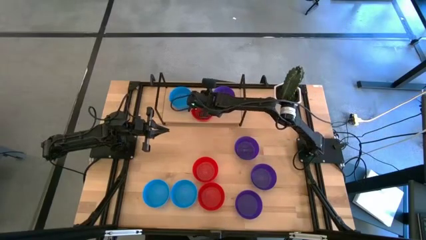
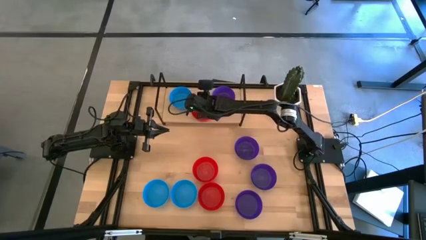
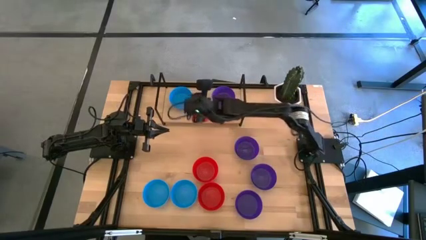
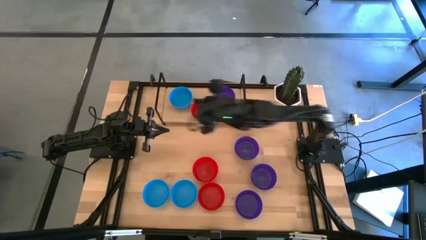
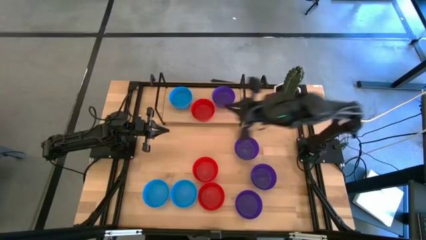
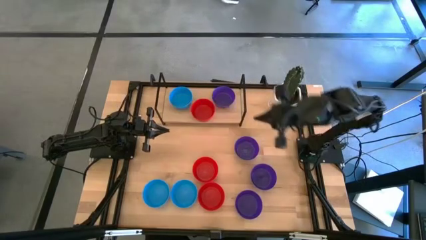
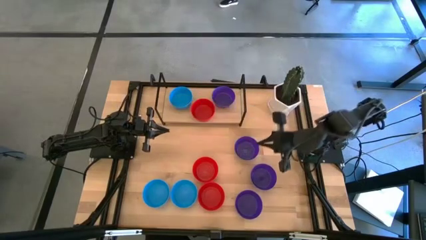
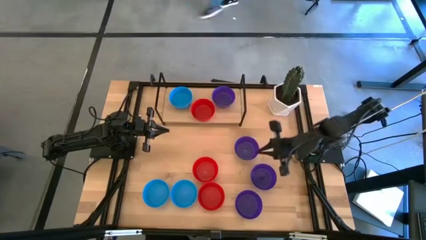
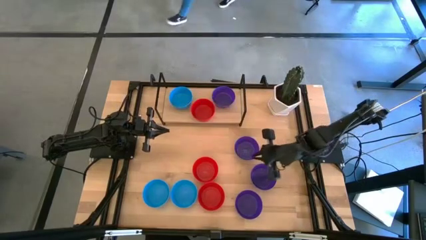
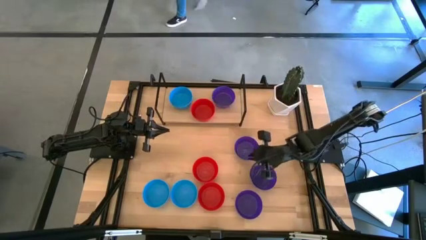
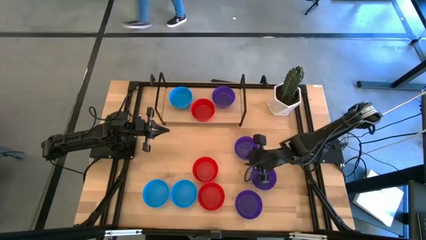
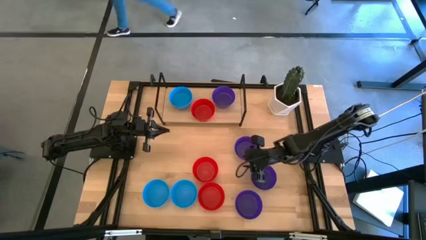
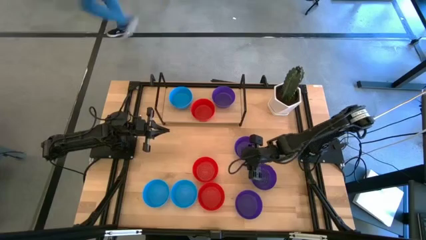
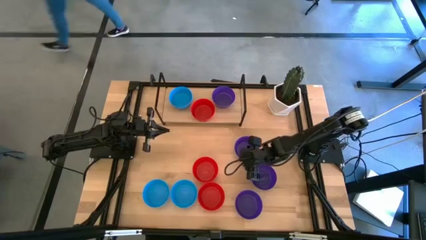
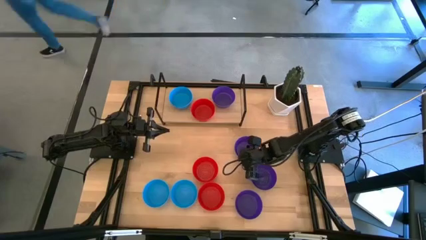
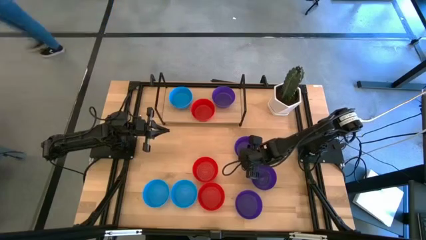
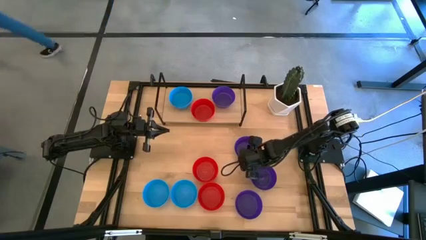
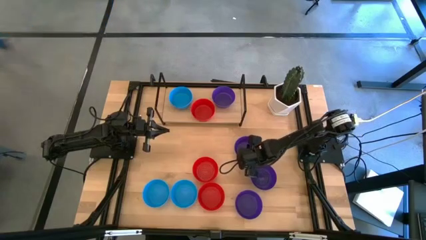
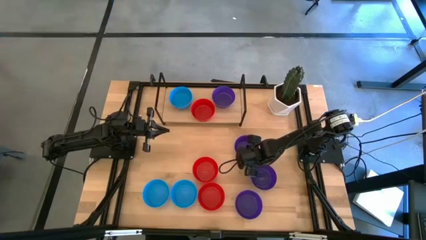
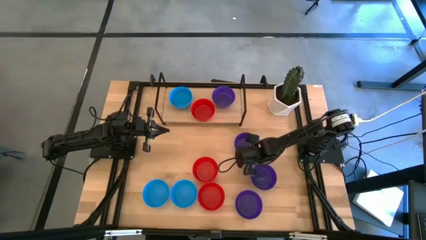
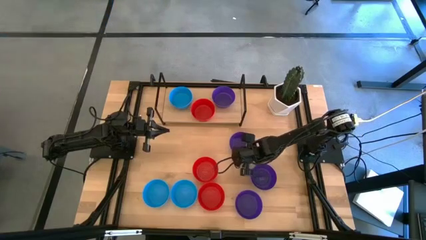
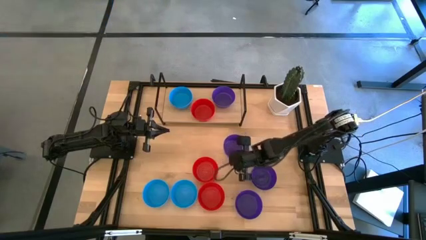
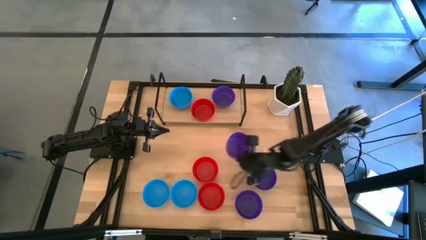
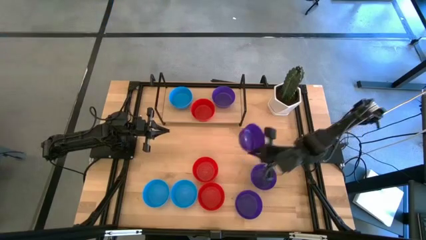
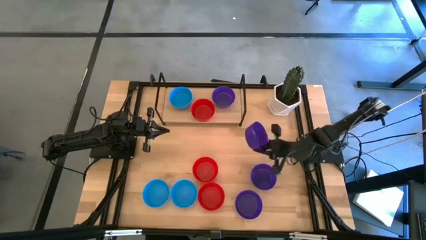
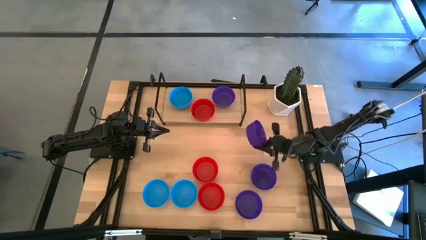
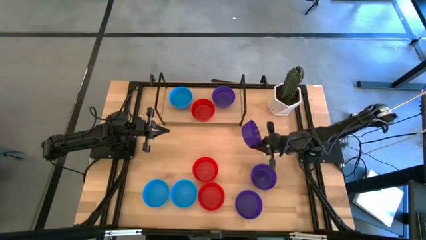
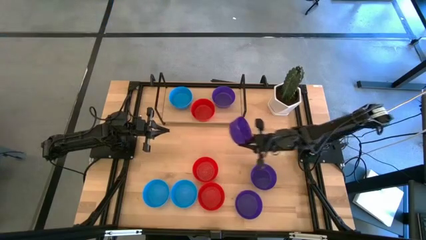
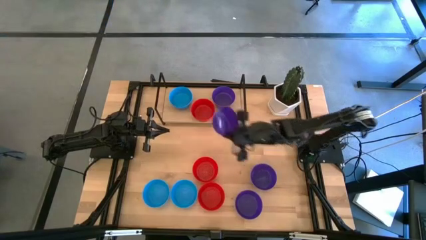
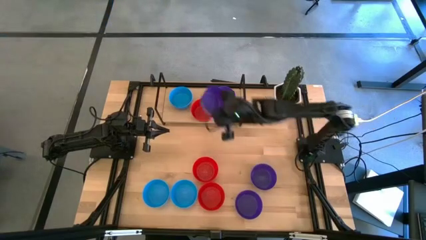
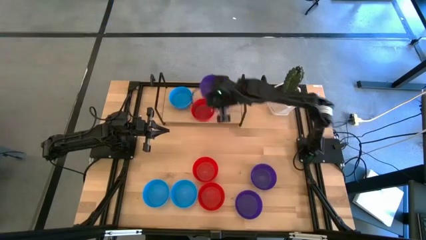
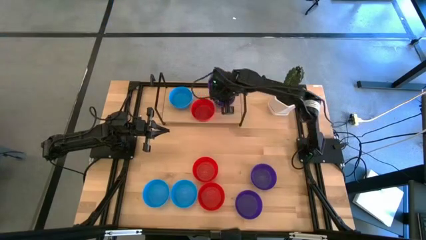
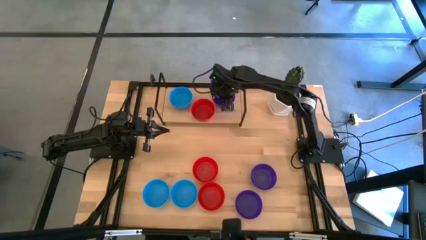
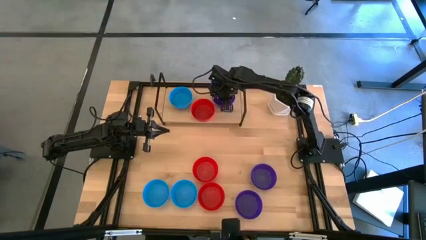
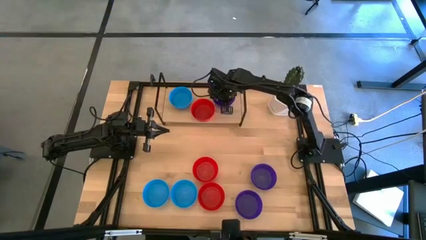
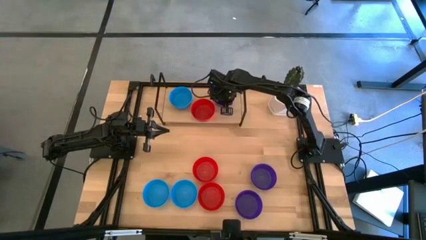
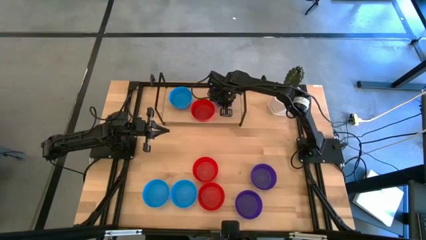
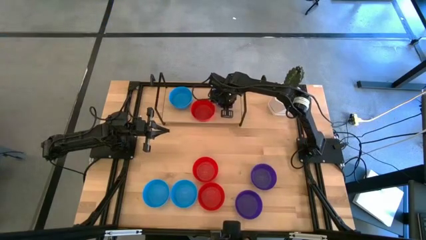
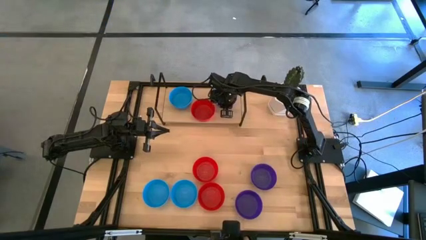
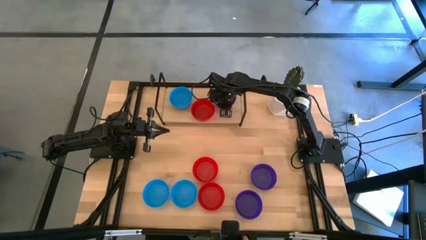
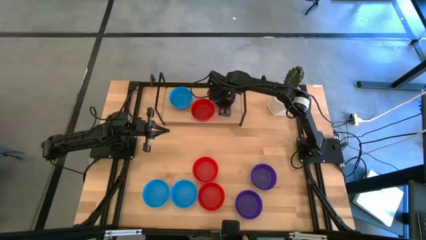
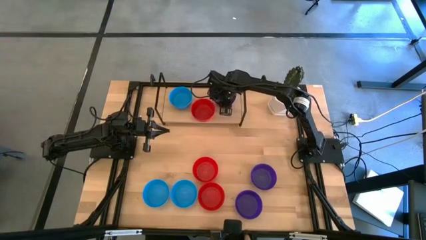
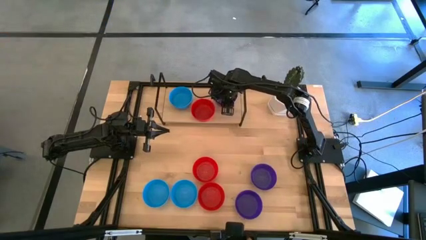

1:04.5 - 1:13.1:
Task: Pick & Place Mini bowls
Stack the violet bowl on top of the violet bowl on the shelf

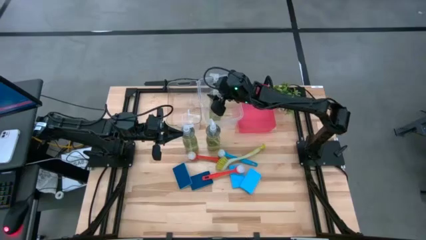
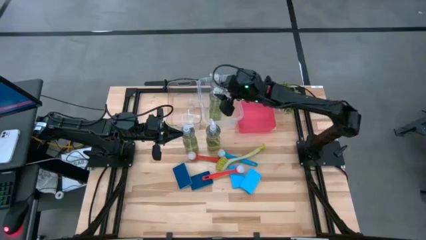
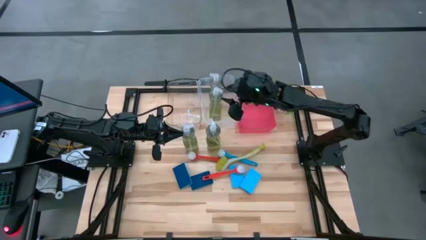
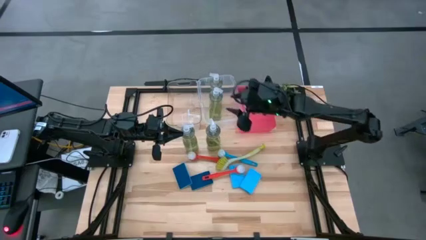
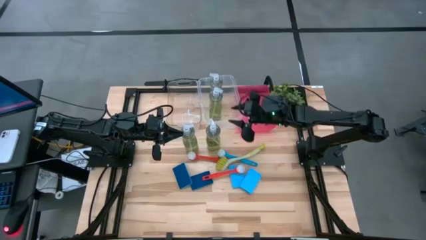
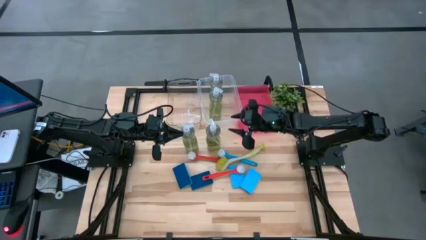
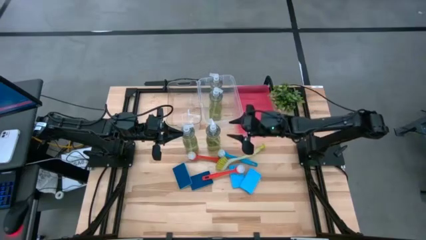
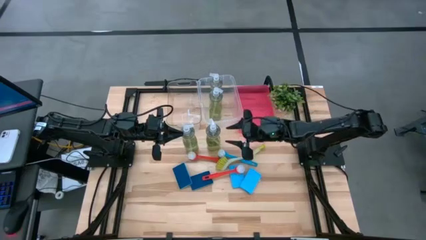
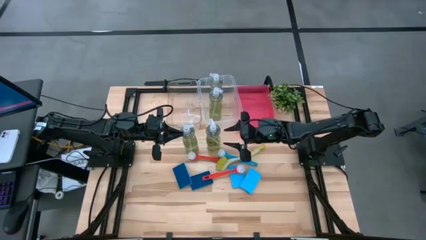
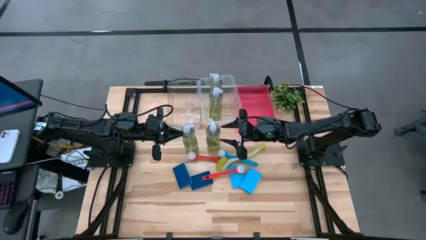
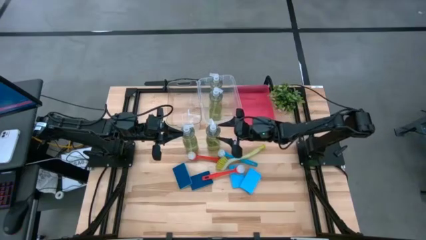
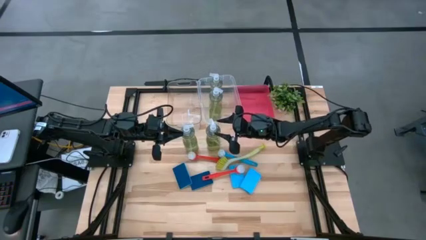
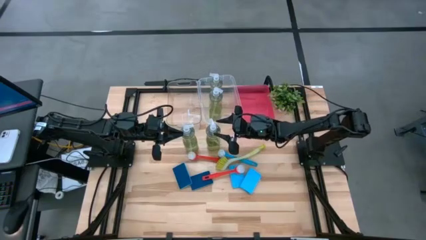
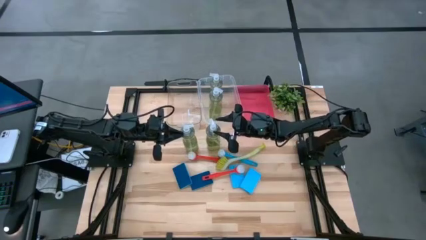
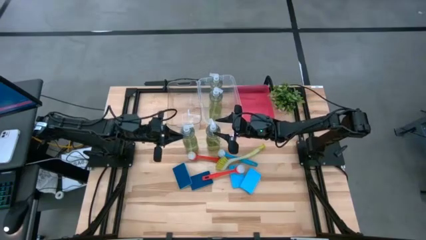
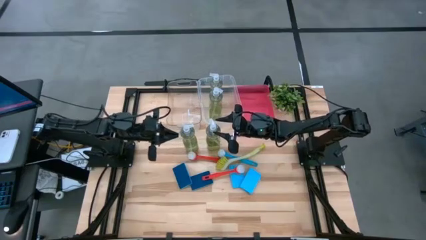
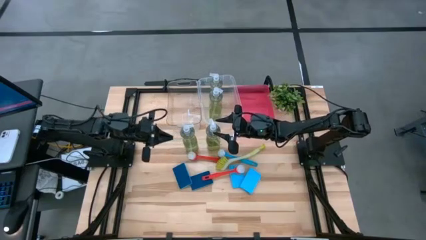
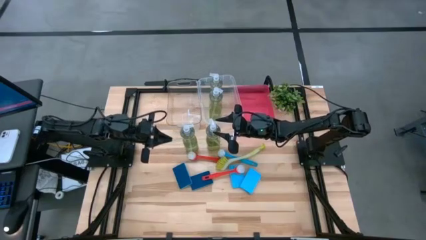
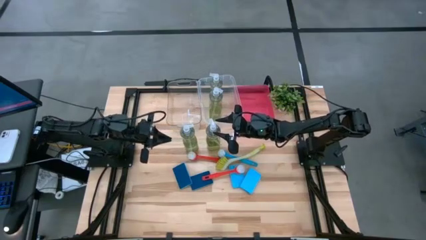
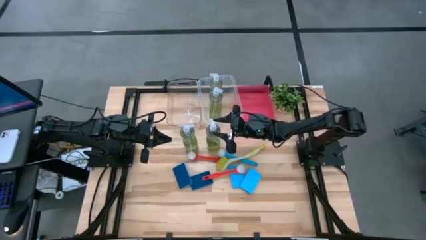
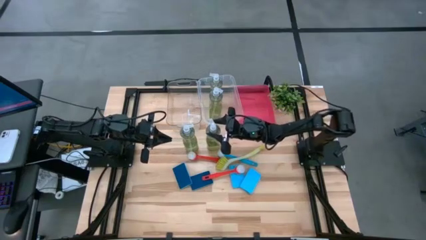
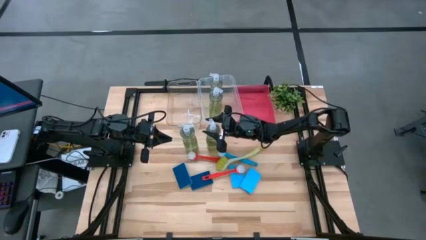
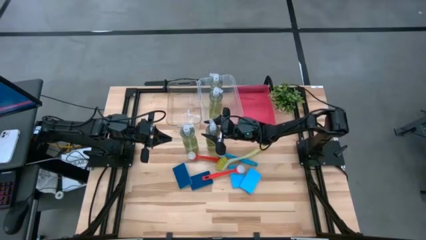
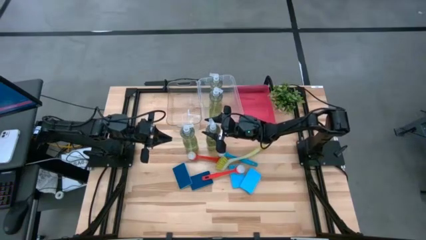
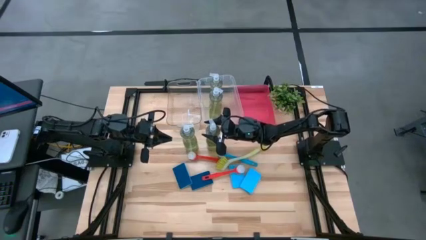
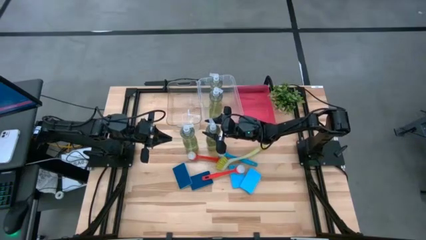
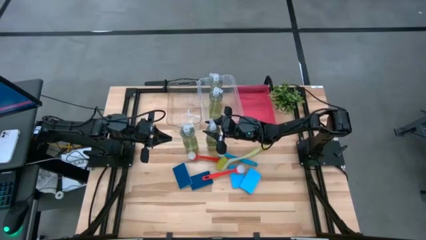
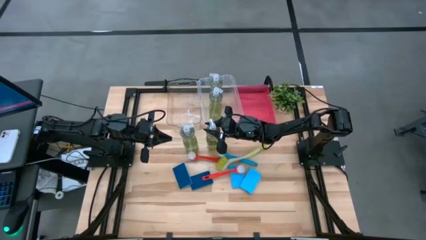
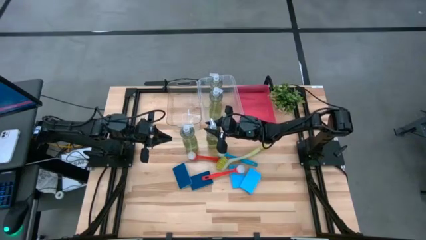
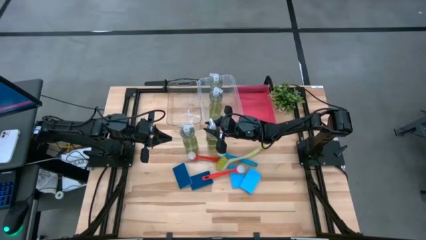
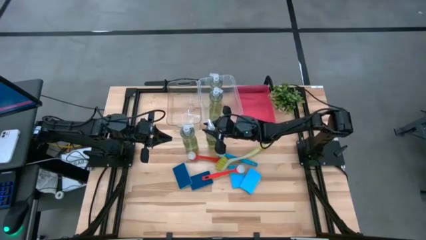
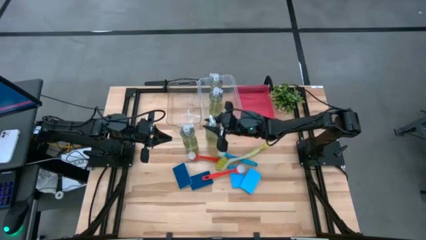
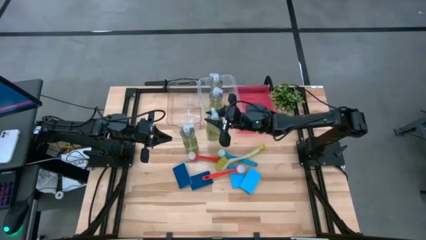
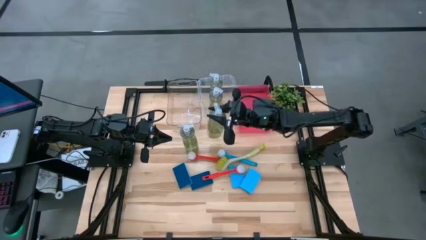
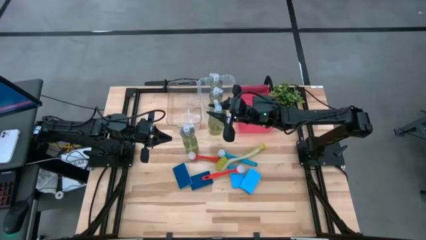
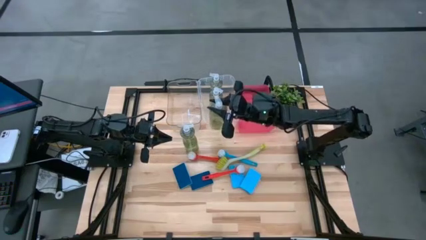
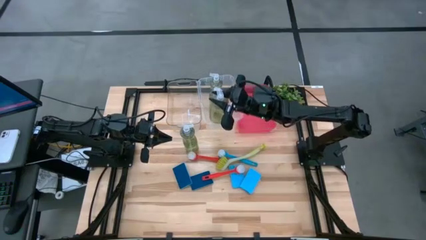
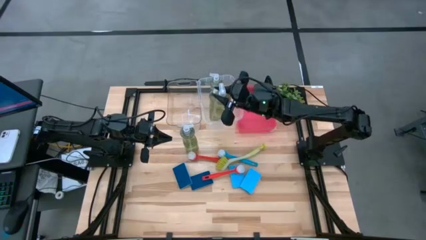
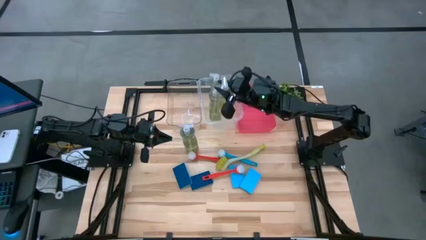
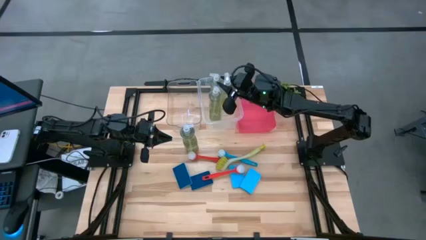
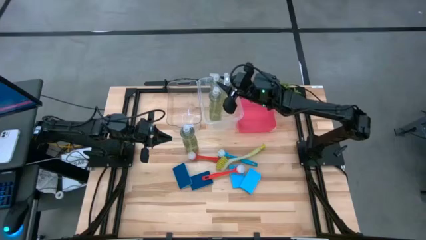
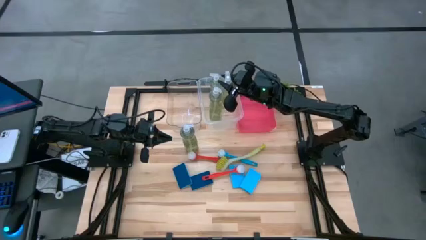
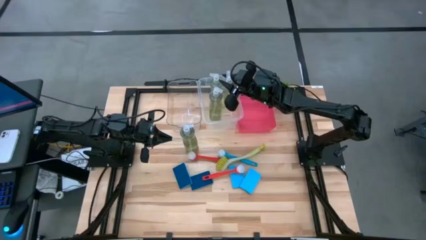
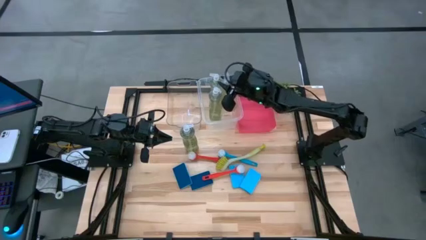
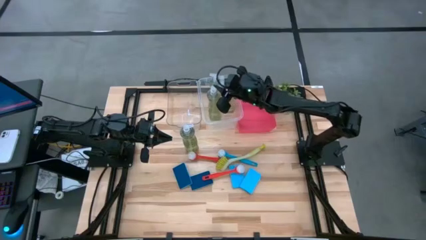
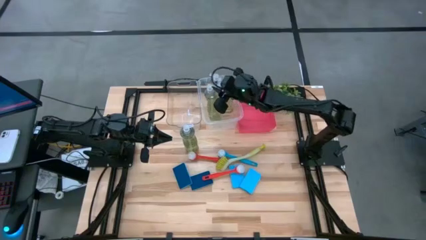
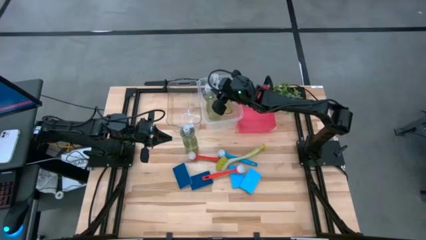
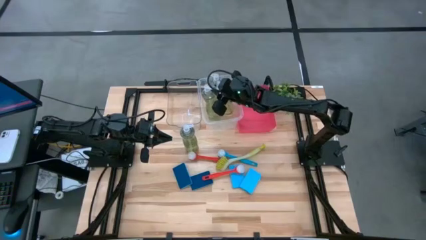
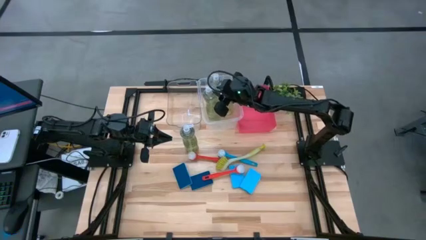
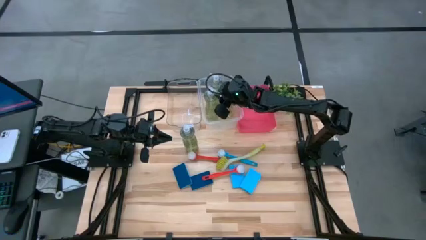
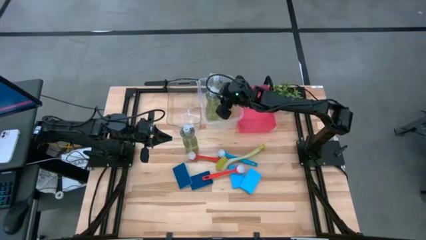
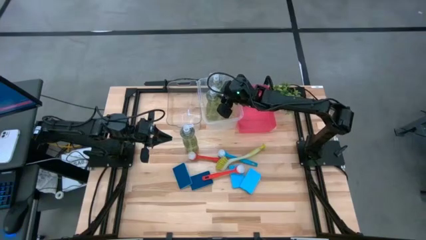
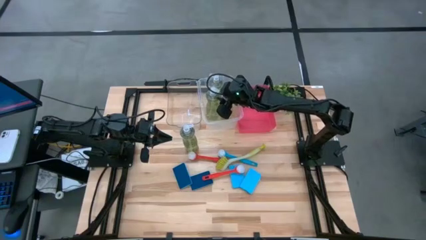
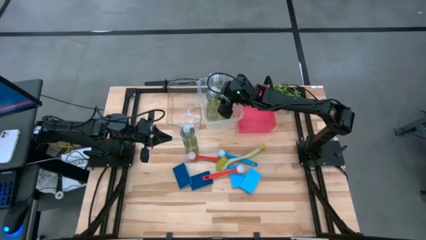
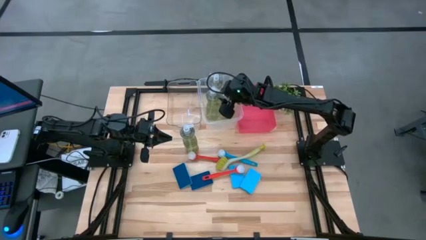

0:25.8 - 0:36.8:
Task: Pick & Place Kitchen Sink Supplies
Put the yellow soap dispenser into the right transparent bin
